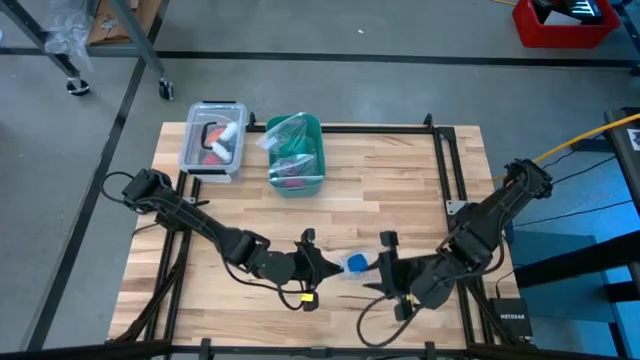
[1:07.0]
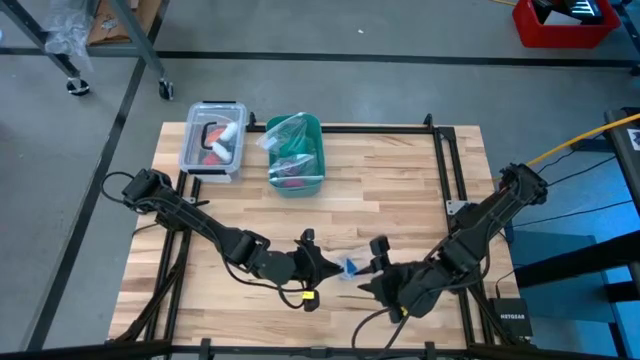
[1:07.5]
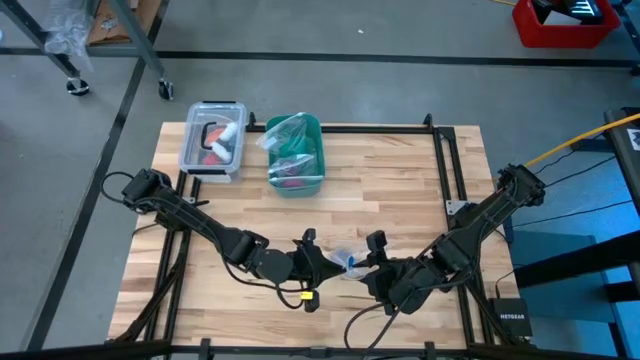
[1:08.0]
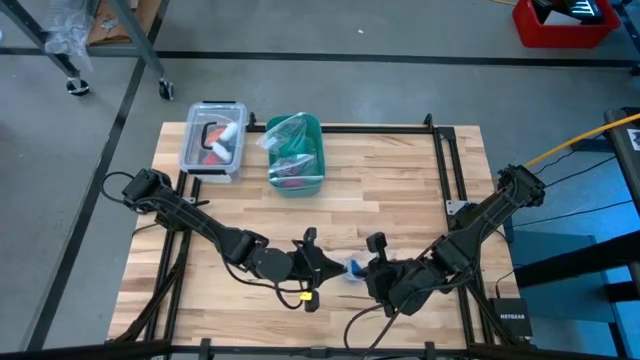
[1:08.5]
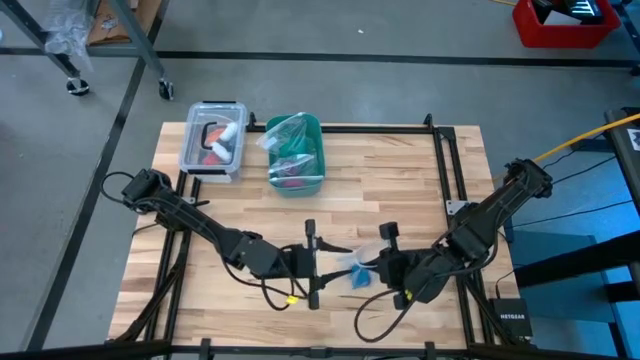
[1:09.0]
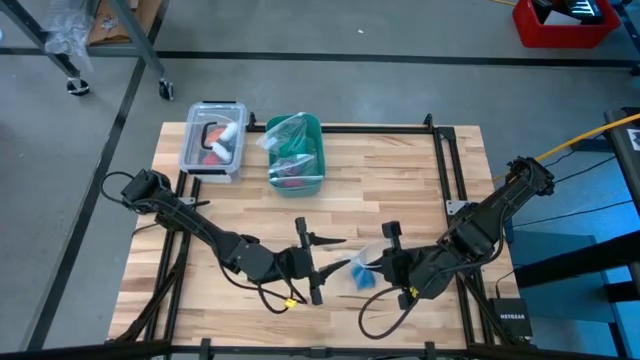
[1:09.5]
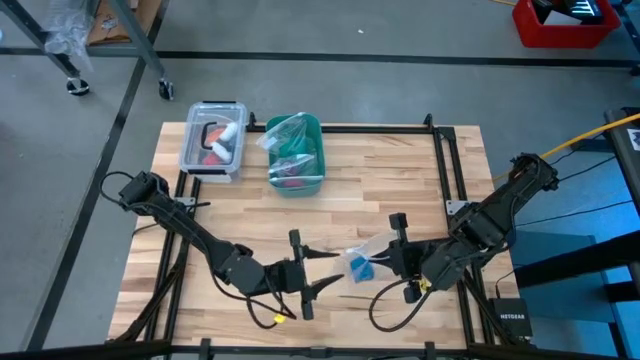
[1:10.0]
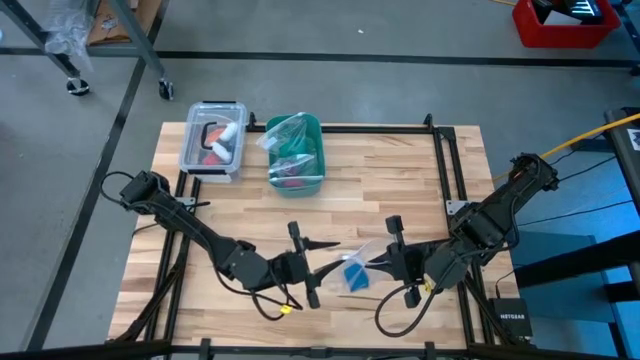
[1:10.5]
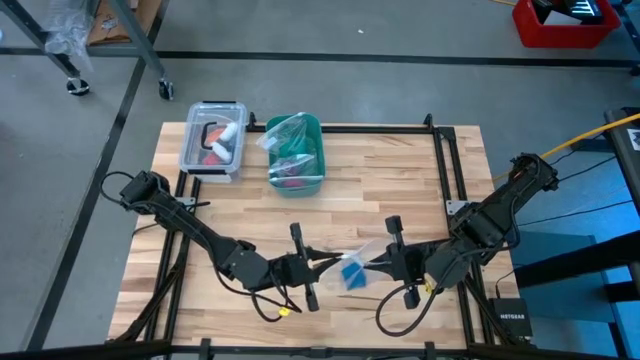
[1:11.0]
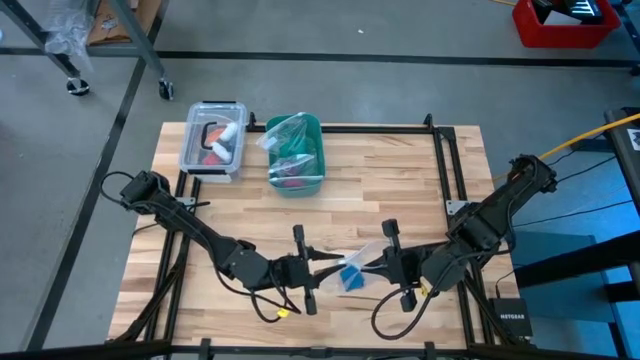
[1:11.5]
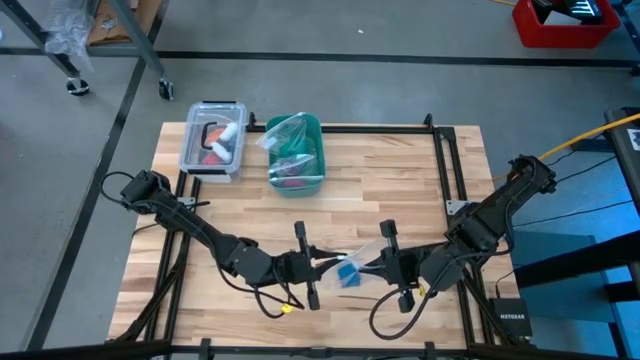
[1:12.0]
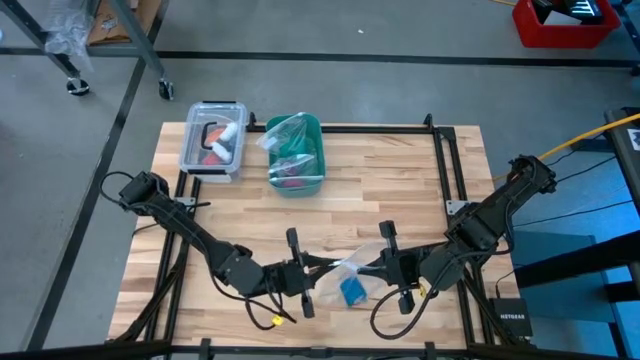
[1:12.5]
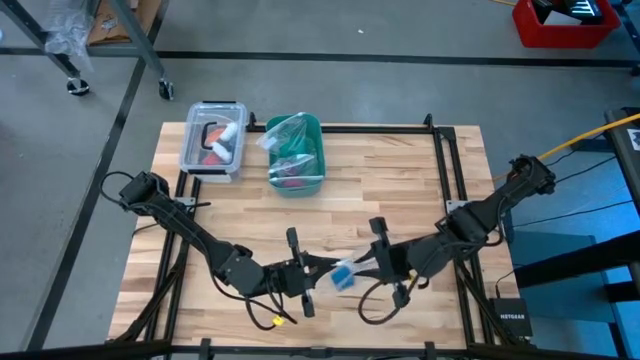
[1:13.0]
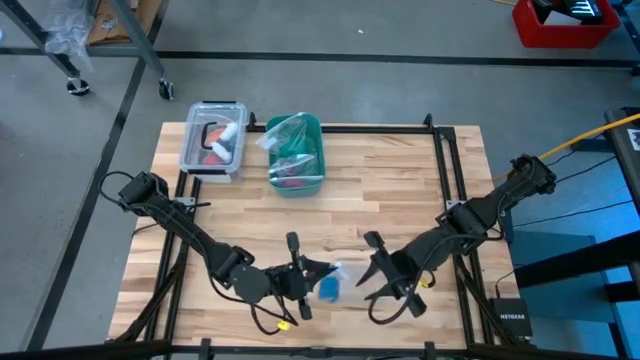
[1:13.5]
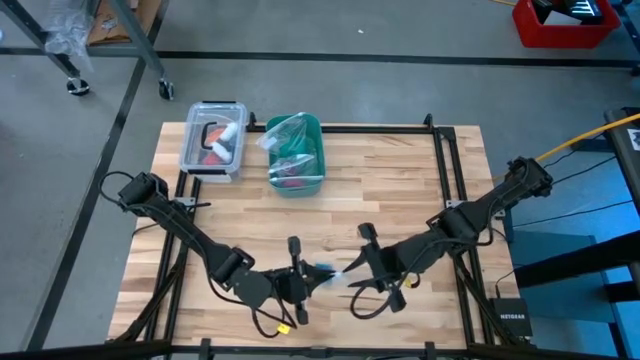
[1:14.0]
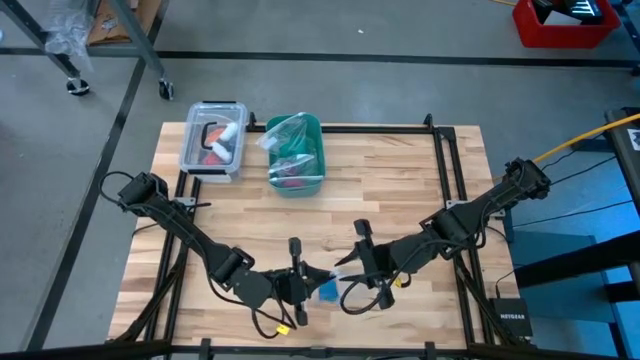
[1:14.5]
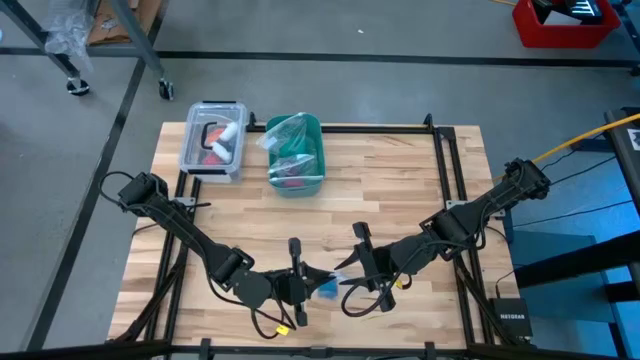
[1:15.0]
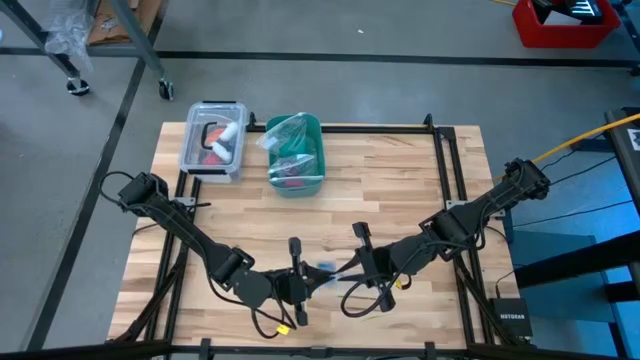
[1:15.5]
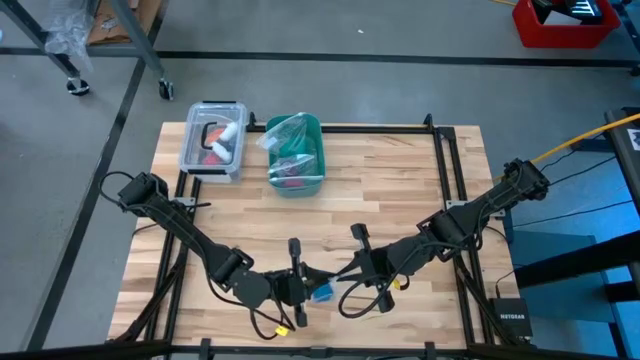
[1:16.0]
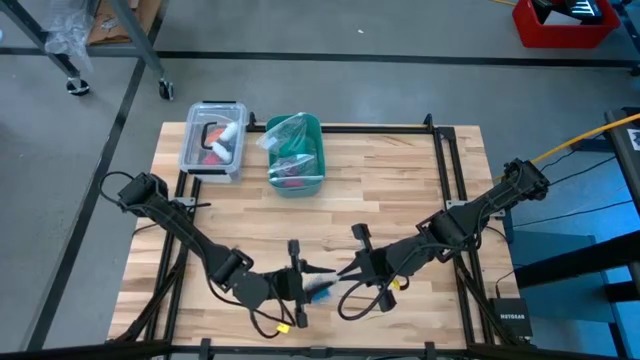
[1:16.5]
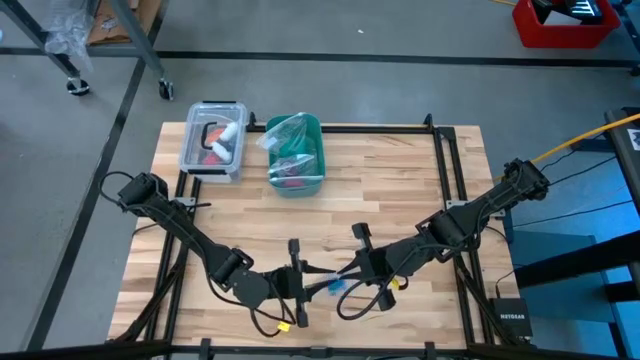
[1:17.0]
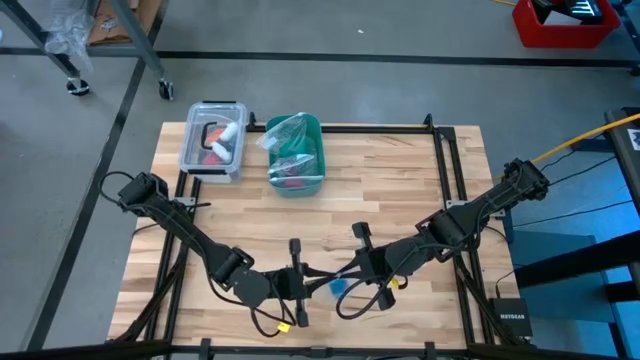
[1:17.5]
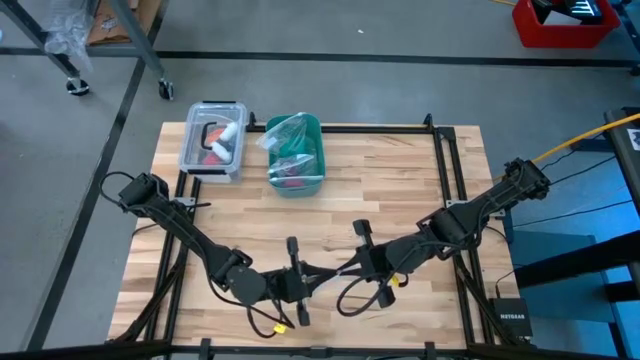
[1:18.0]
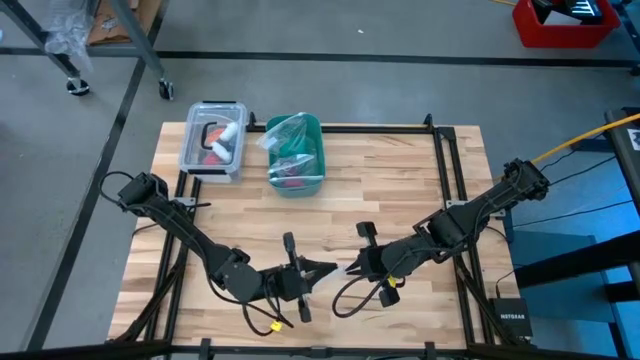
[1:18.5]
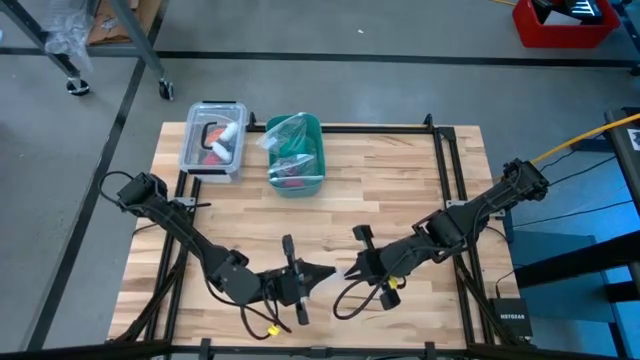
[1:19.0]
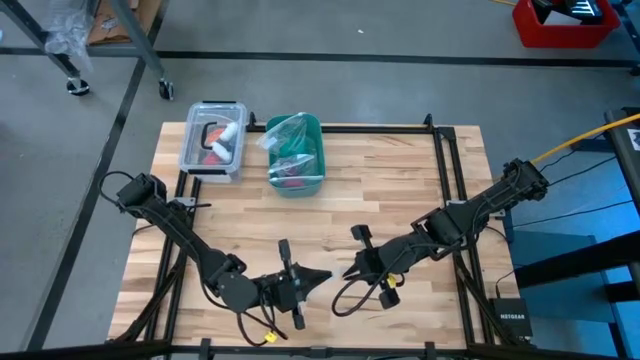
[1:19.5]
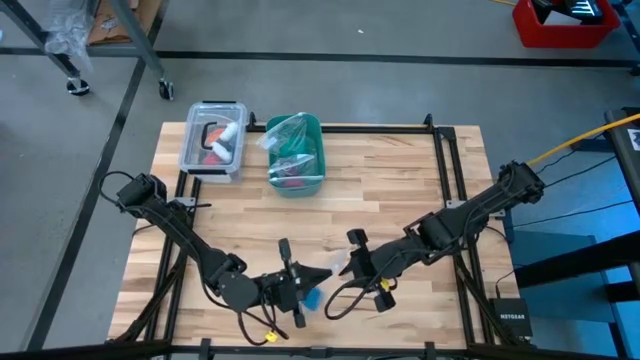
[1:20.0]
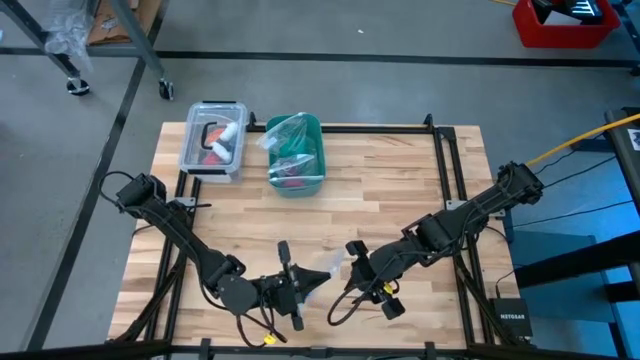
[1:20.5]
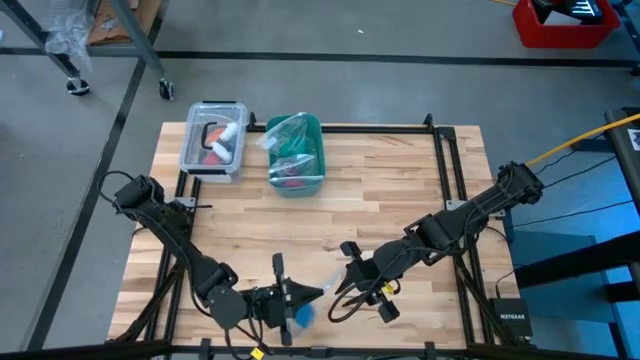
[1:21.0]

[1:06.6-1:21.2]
Task: Roll bandage
Close the transparent zip bag

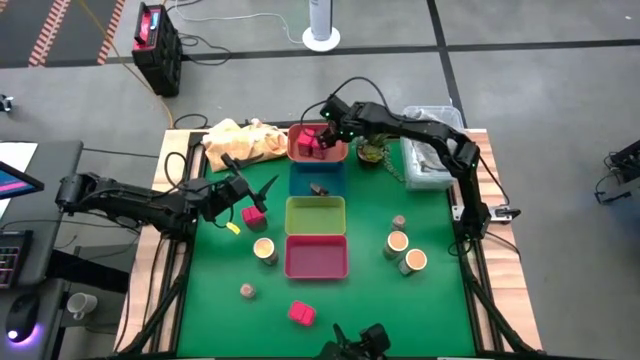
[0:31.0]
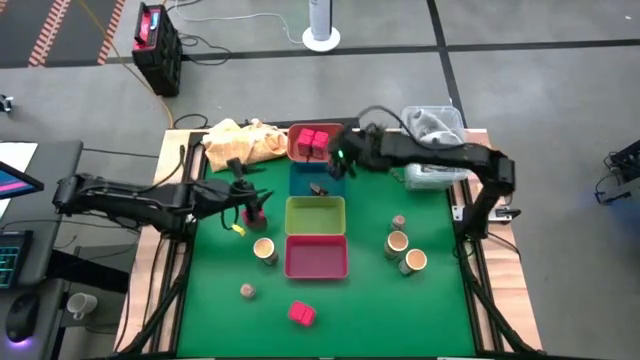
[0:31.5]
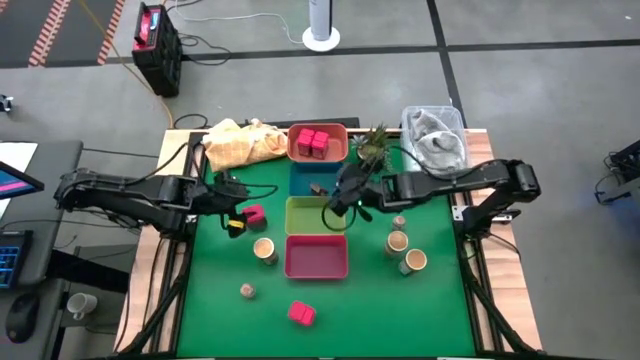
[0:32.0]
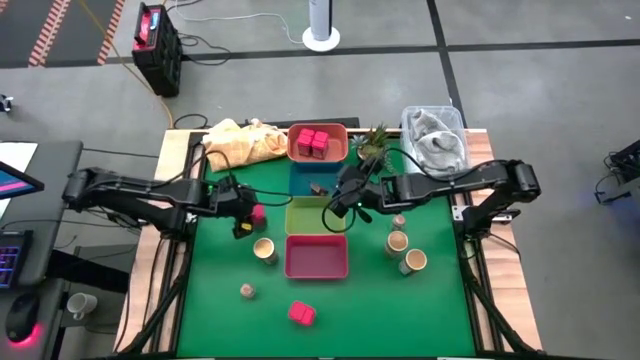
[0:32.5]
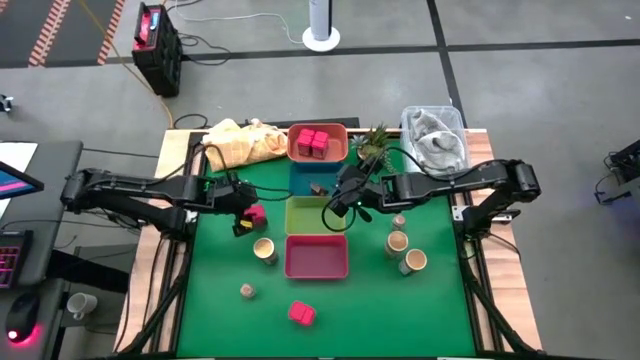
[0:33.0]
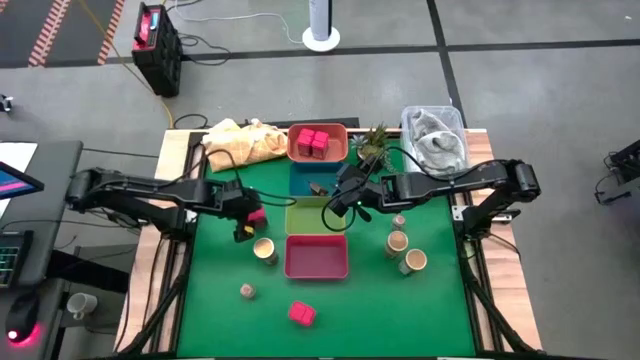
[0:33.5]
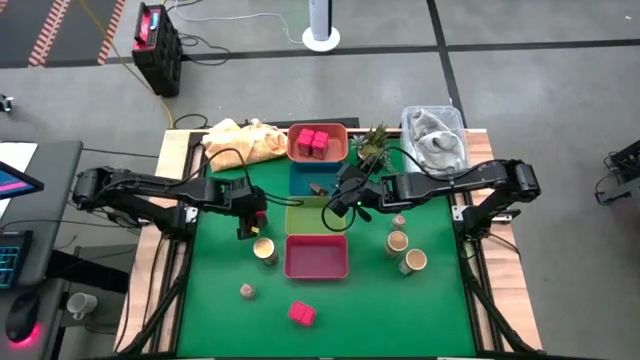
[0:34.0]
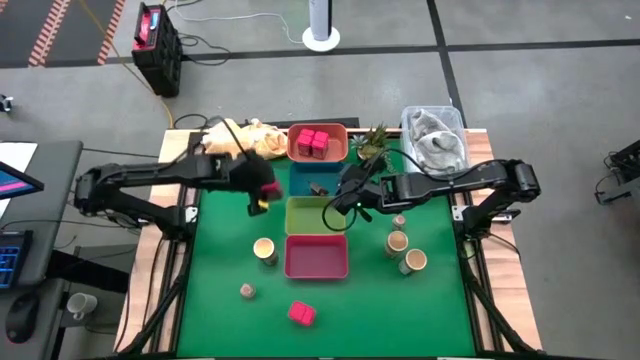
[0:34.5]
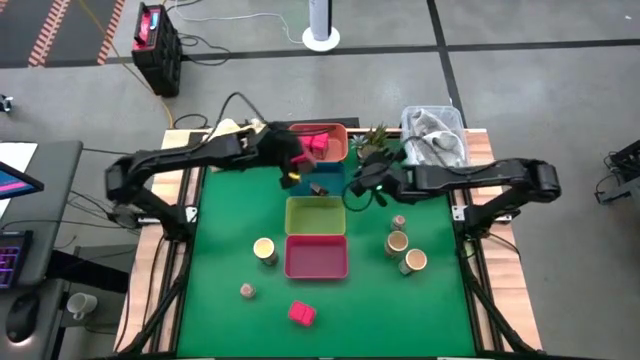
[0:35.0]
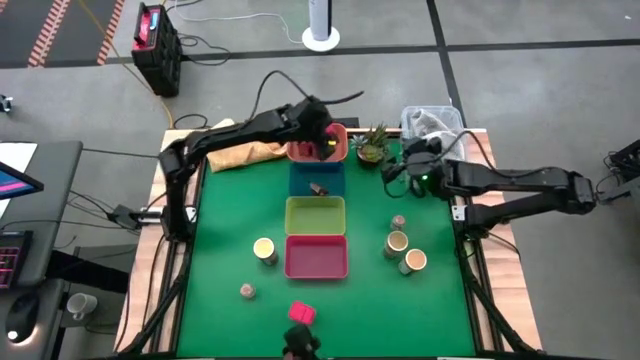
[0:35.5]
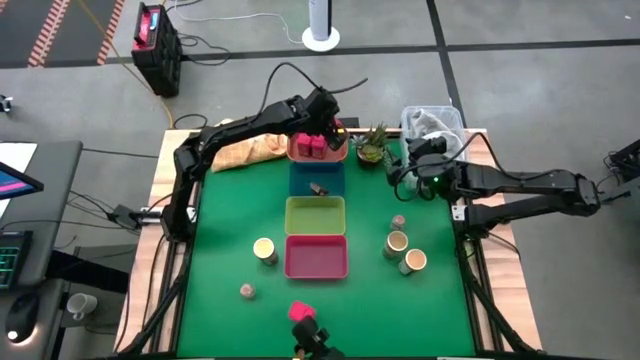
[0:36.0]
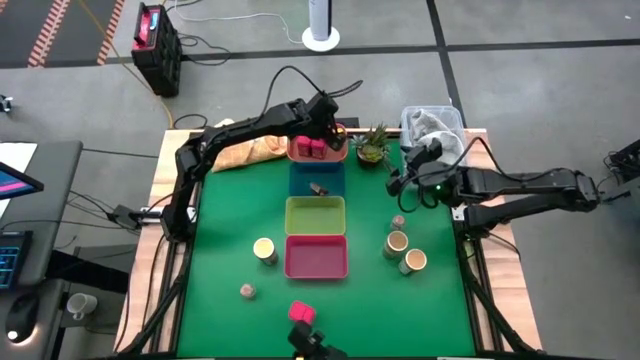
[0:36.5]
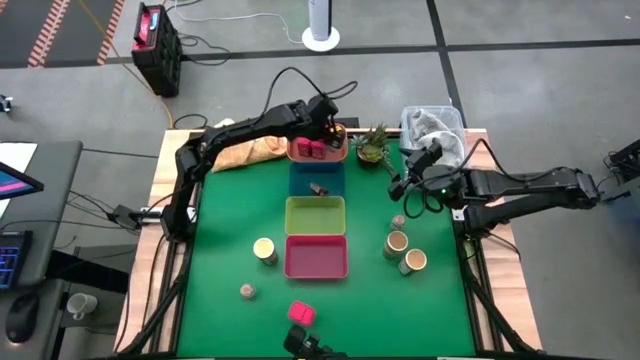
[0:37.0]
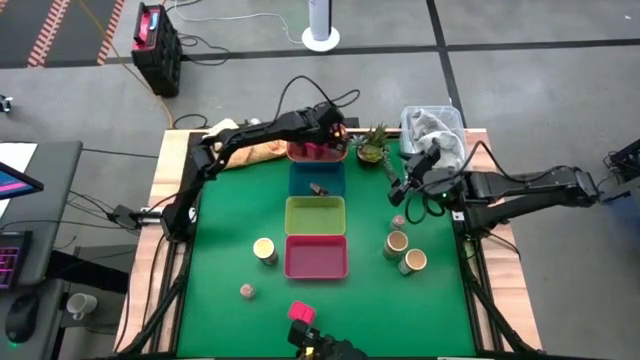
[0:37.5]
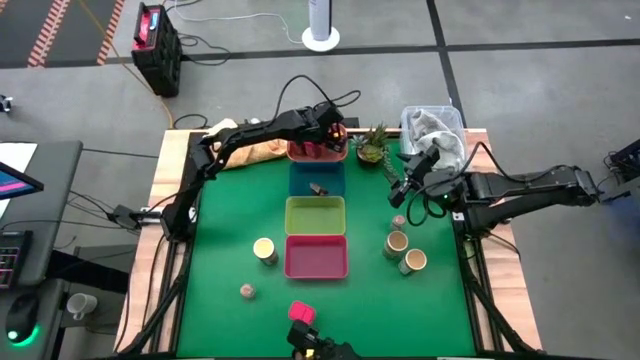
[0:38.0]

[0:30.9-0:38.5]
Task: Sort spices by type
Put the top red seasoning can into the orange bin
